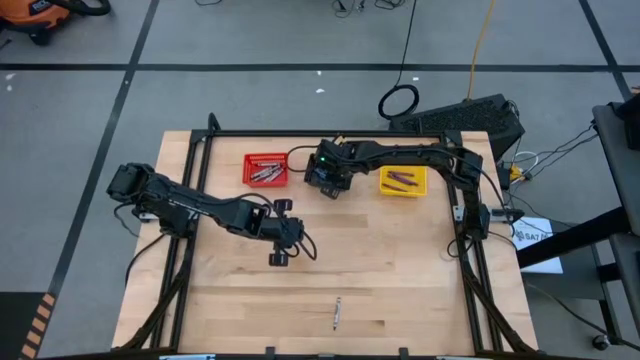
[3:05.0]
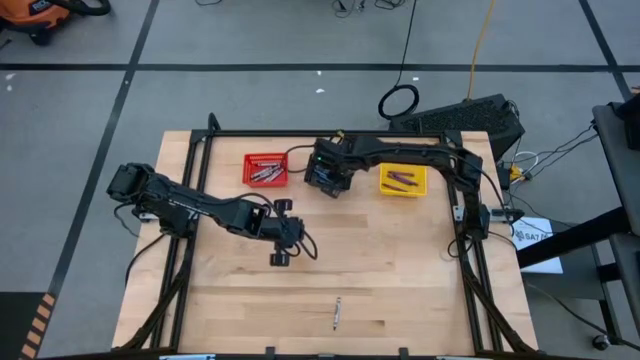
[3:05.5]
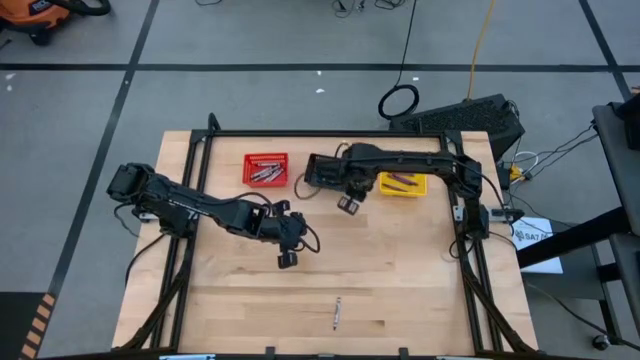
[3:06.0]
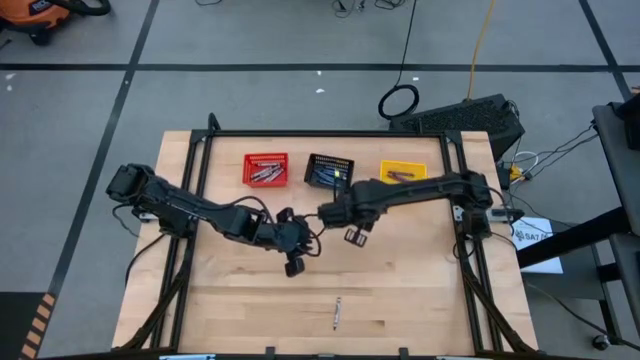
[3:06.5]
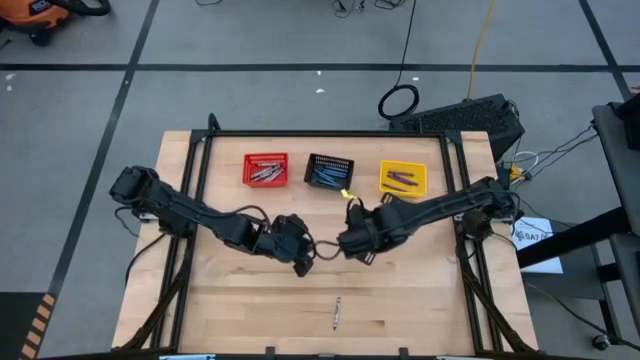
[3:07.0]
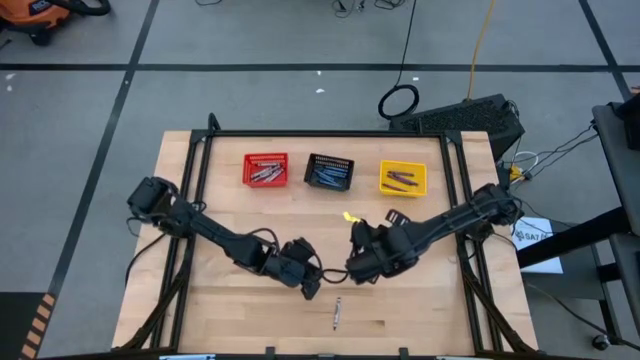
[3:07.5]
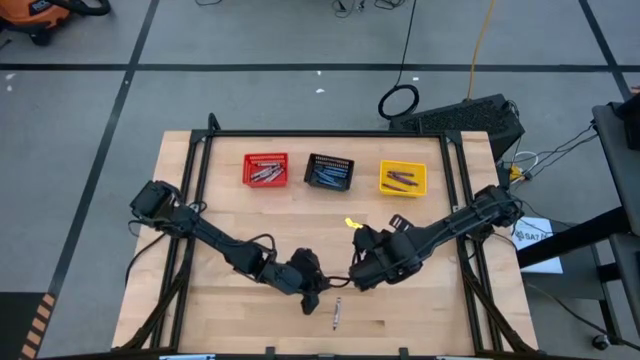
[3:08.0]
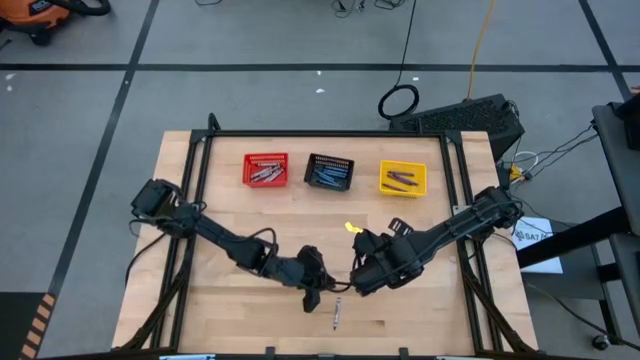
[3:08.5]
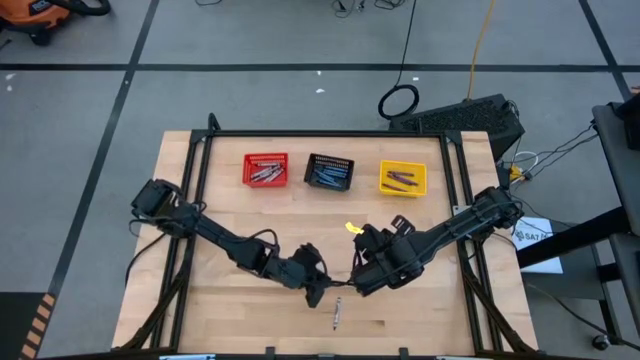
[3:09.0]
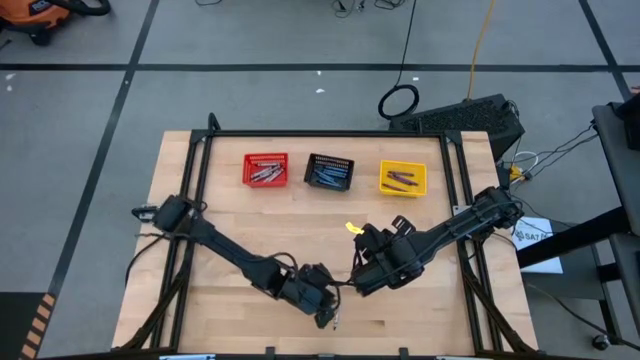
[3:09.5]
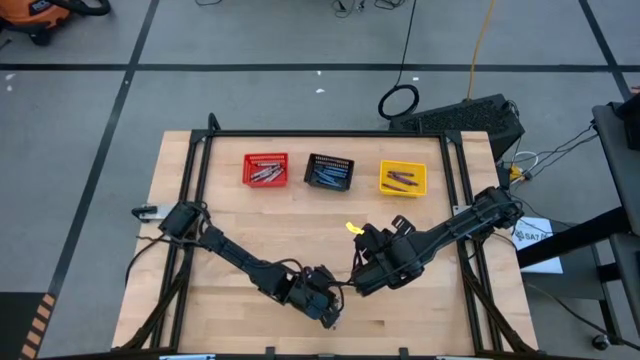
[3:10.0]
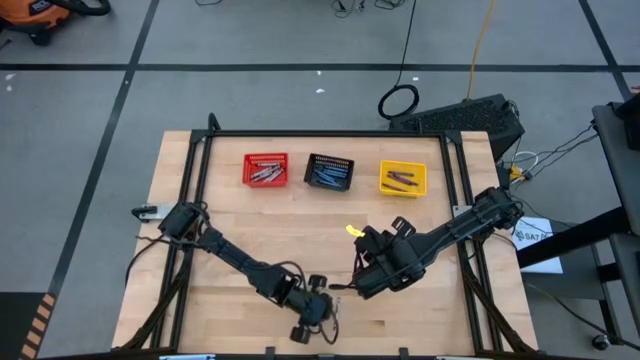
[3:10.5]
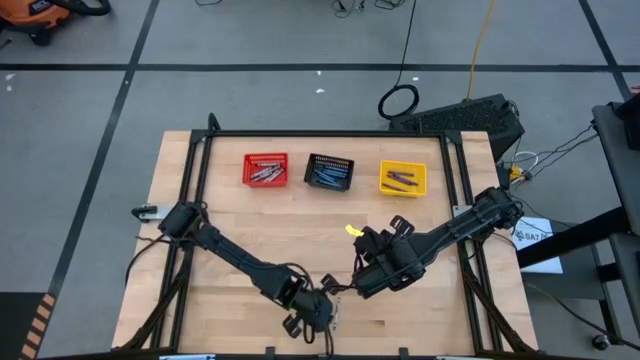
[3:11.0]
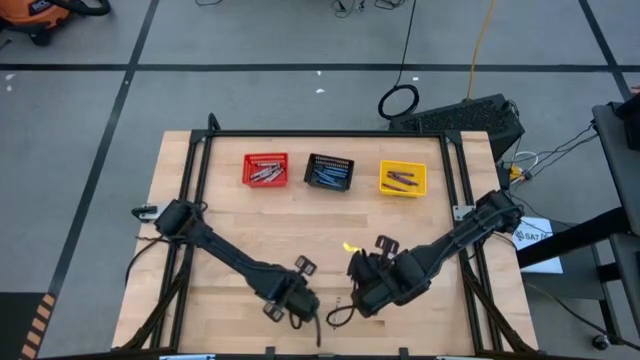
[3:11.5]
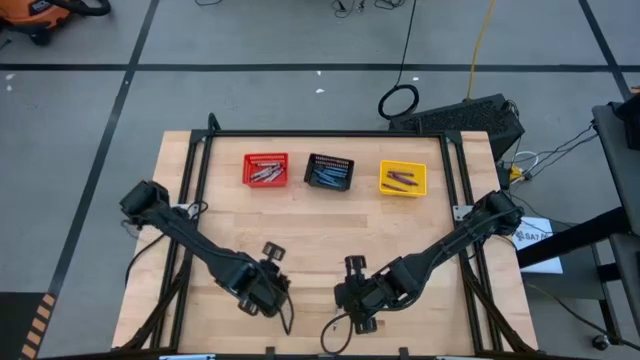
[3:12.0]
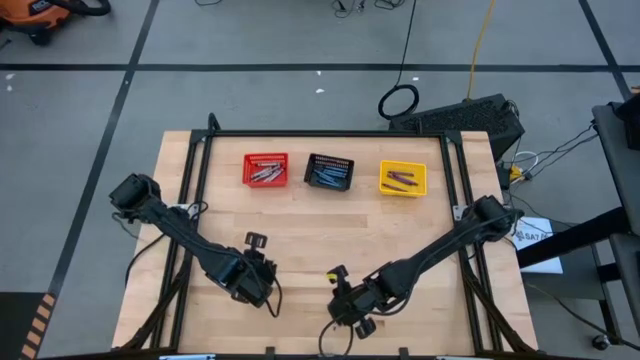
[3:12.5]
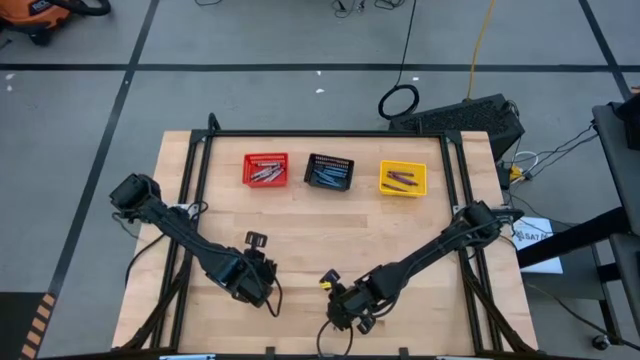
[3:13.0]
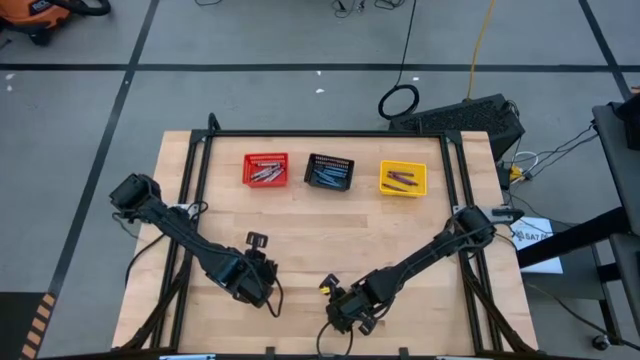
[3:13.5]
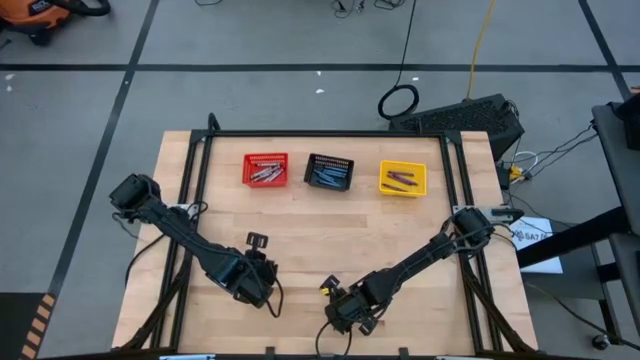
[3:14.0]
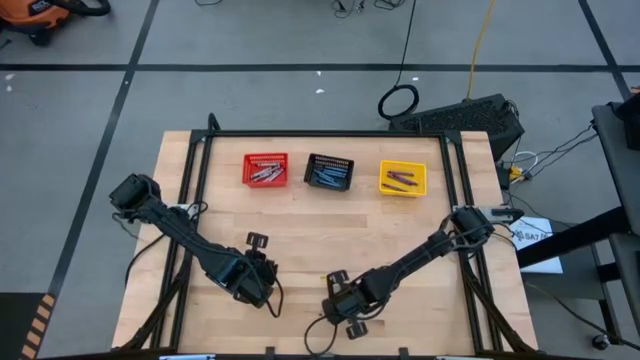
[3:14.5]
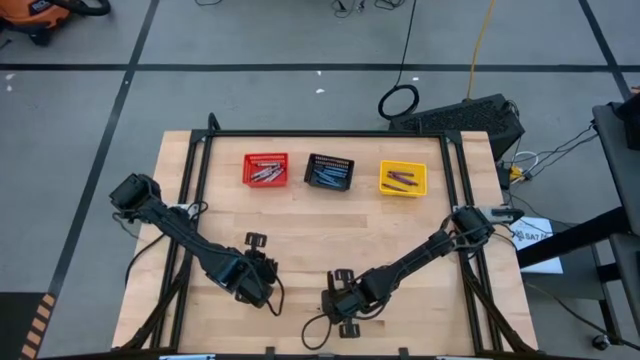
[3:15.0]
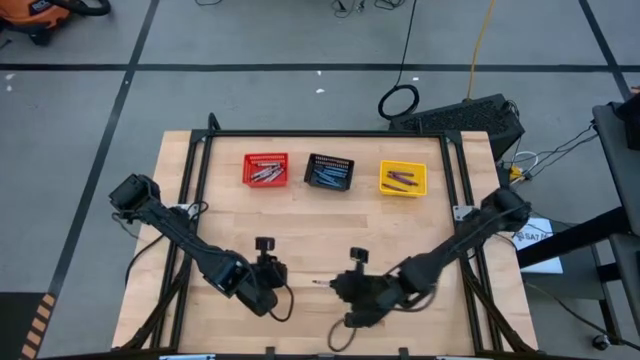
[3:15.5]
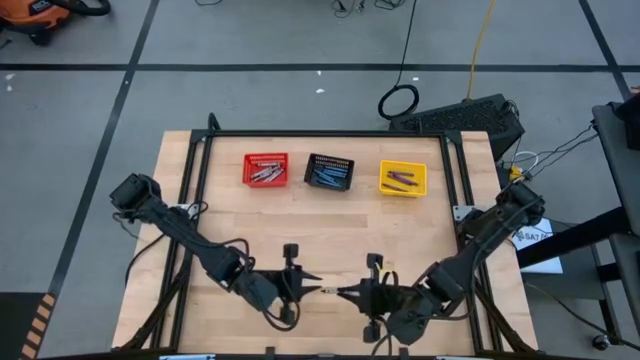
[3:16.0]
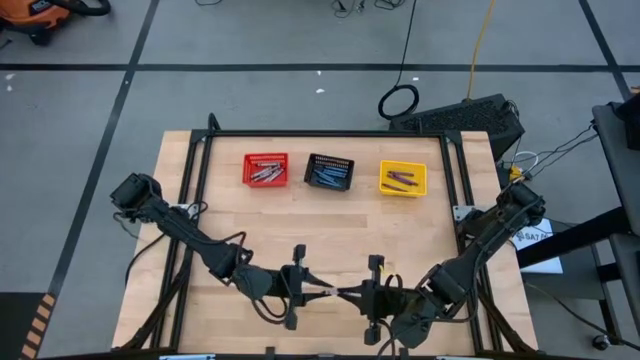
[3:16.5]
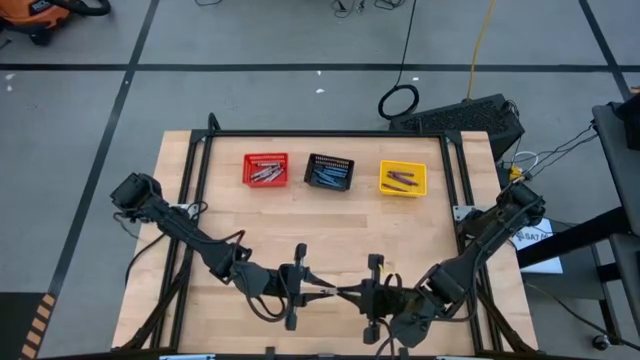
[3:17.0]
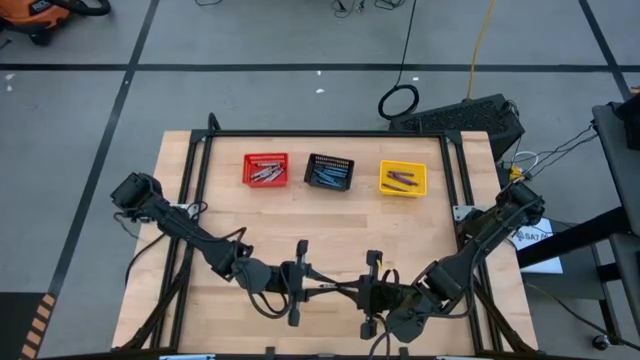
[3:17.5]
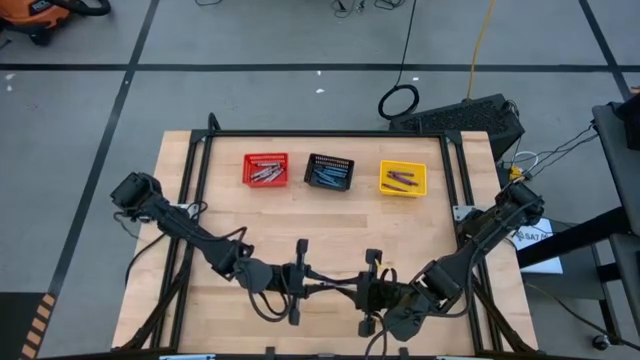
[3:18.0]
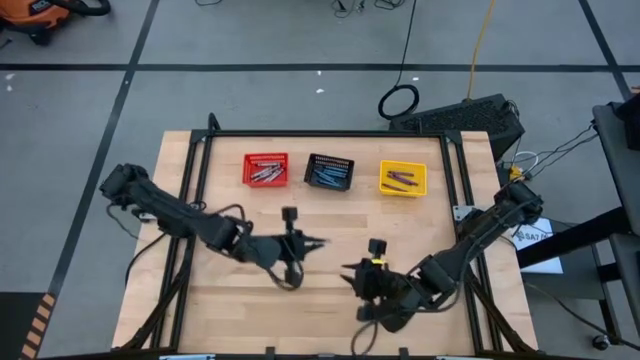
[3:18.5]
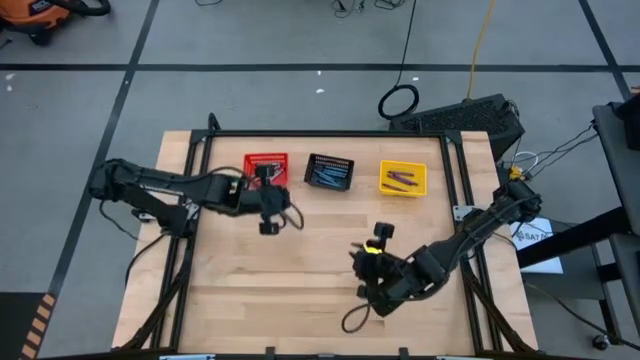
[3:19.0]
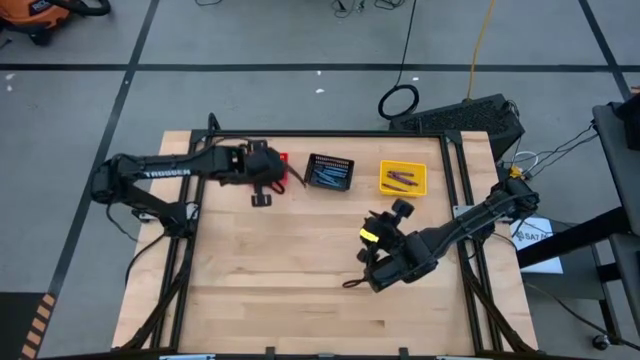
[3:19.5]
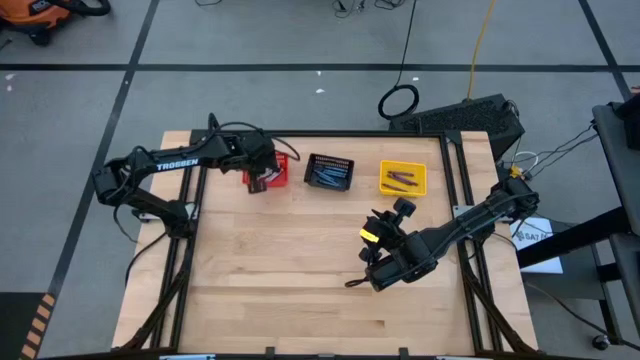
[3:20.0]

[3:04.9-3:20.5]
Task: Sort crayons
Put the gray crayon into the red bin

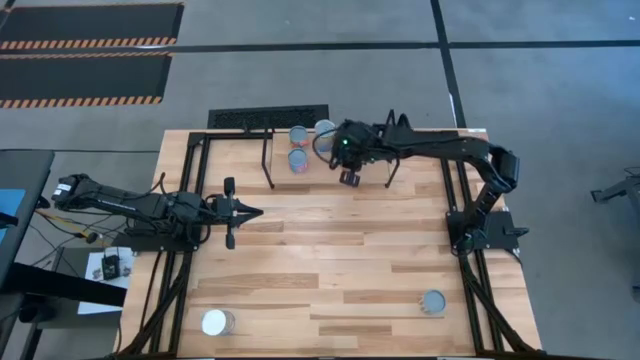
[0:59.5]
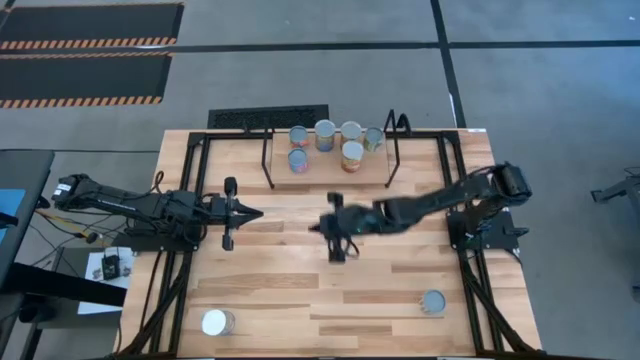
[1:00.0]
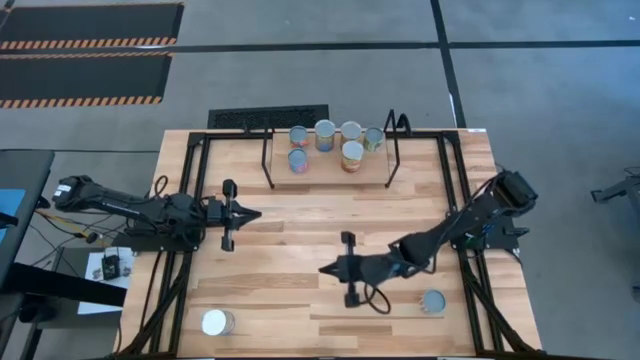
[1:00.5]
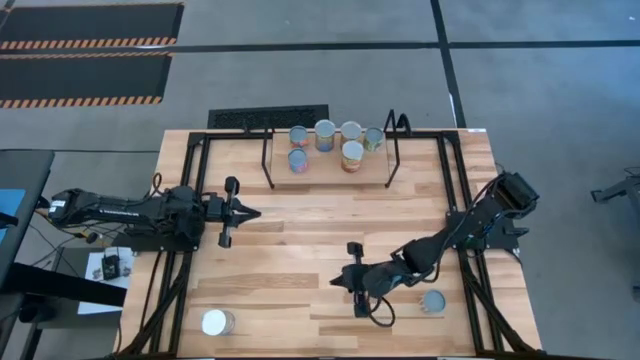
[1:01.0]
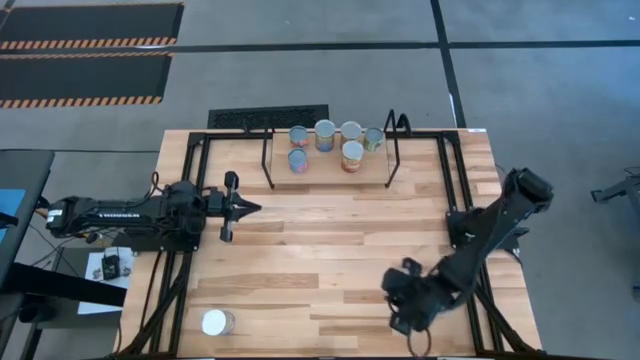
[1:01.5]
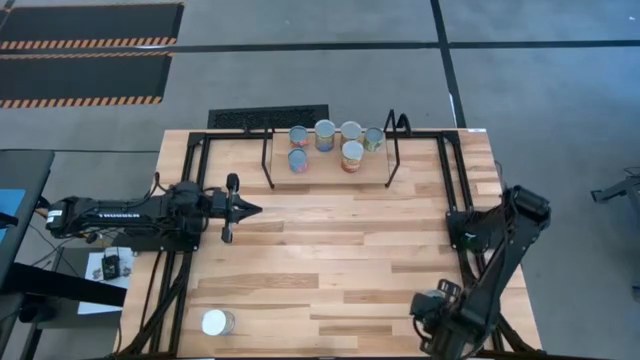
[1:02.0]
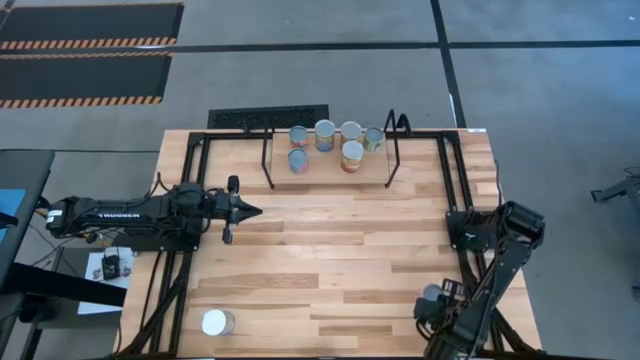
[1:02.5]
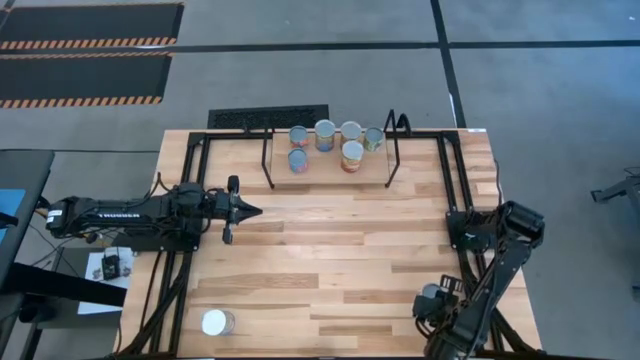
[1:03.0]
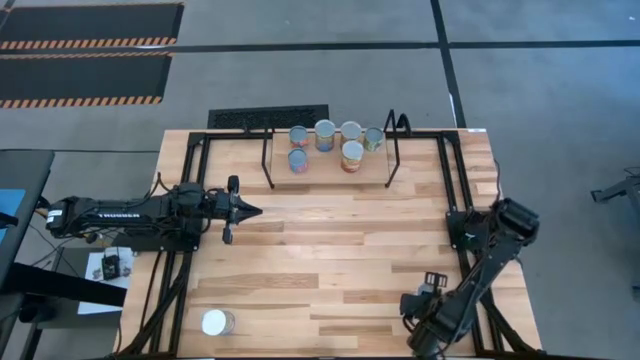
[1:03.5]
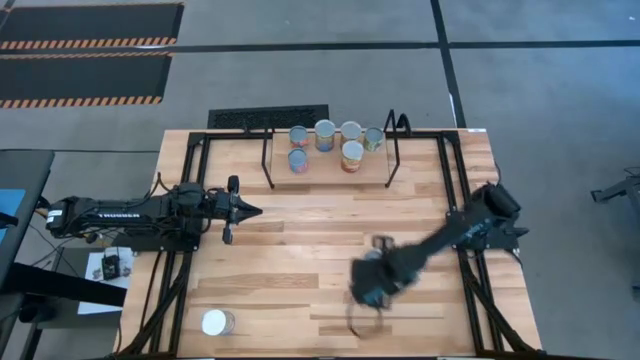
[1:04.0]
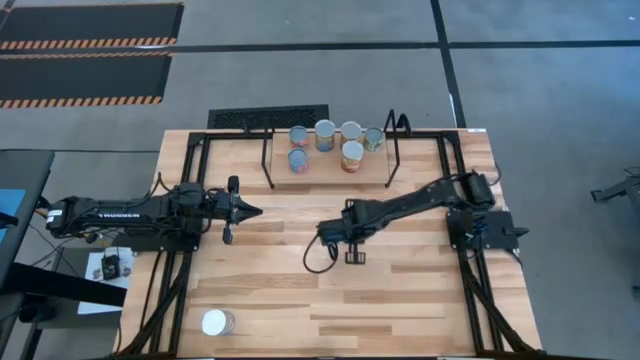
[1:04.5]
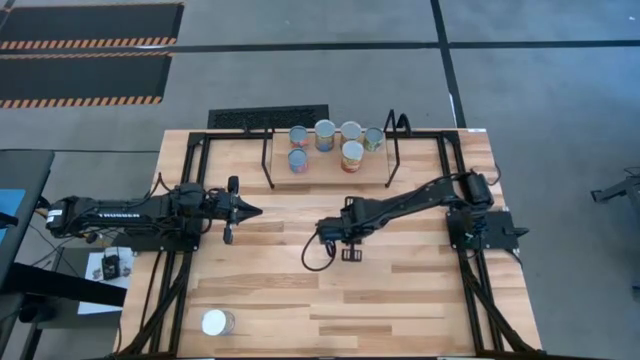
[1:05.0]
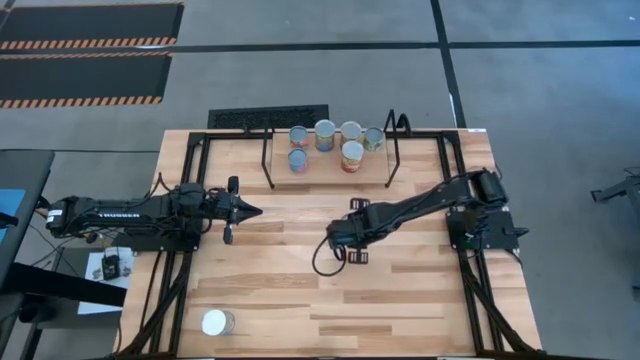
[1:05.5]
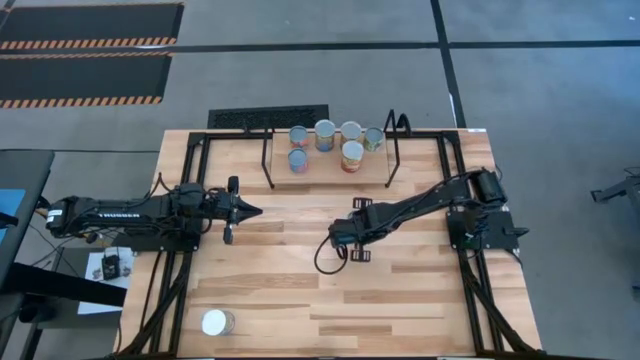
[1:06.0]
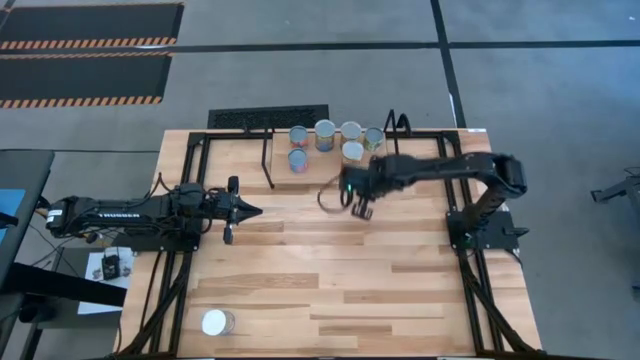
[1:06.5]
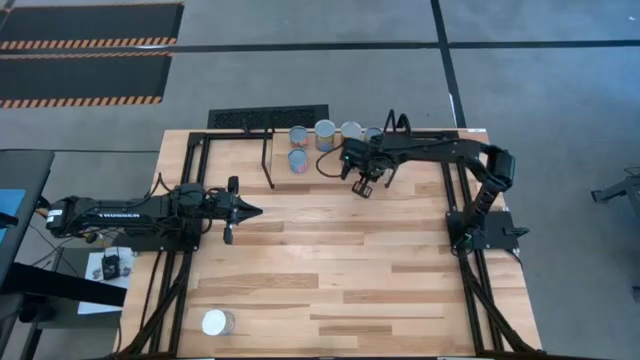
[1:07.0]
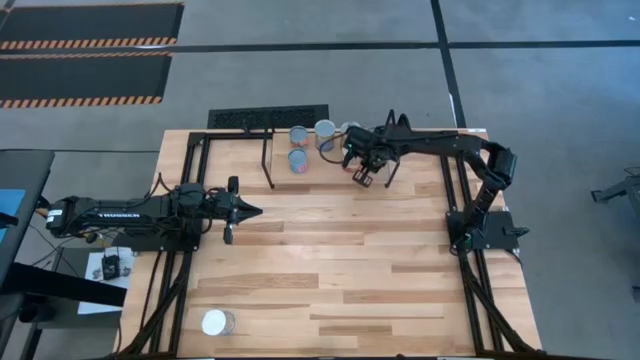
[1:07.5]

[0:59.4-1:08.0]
Task: Pick and place cans onto a shelf
Put the canned carrots on the shelf aligned with the canned peas
